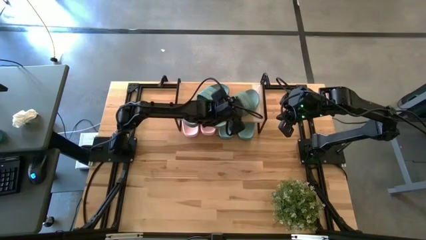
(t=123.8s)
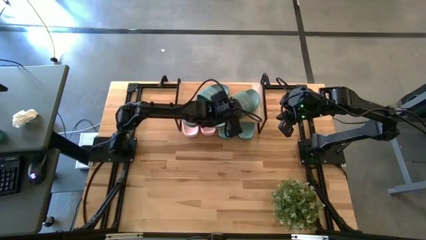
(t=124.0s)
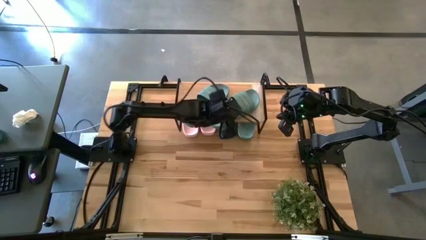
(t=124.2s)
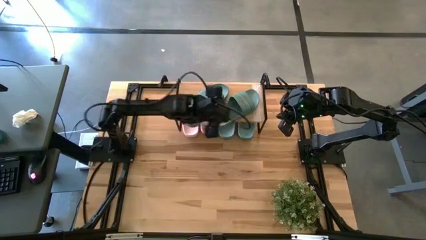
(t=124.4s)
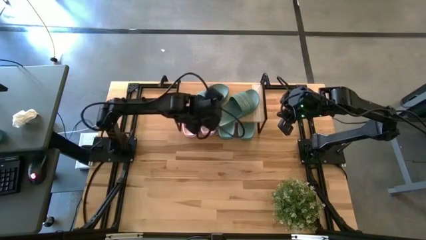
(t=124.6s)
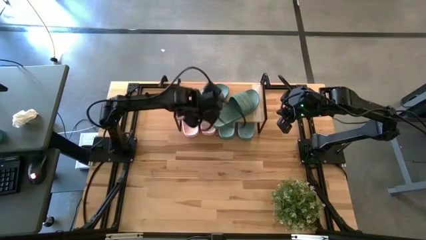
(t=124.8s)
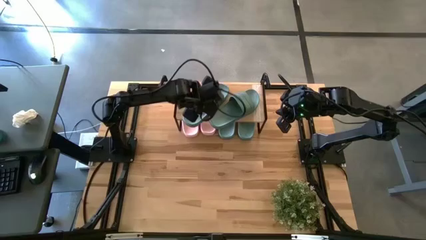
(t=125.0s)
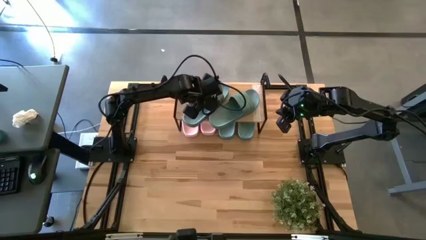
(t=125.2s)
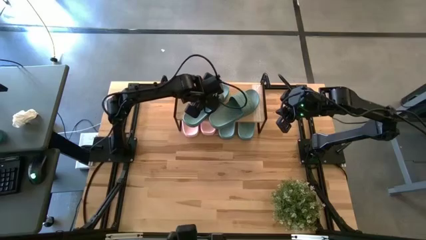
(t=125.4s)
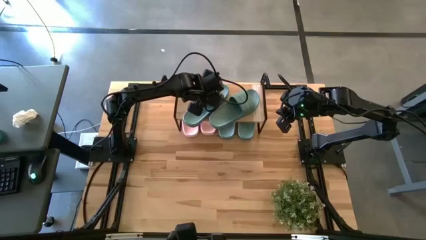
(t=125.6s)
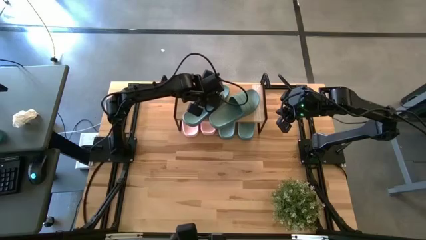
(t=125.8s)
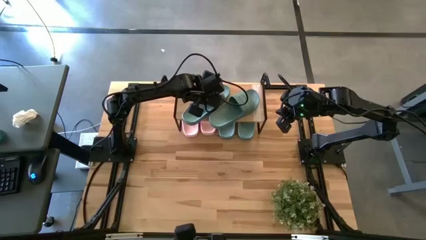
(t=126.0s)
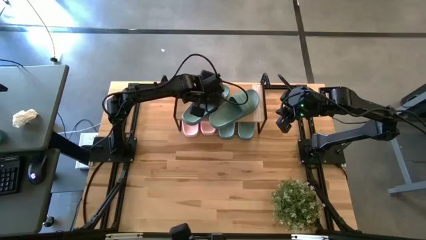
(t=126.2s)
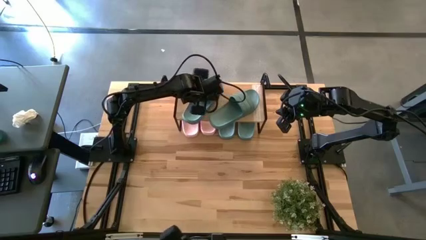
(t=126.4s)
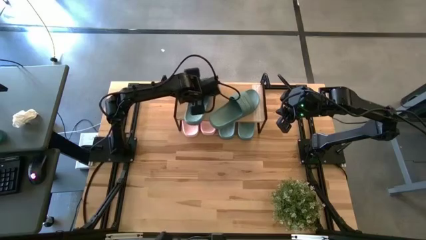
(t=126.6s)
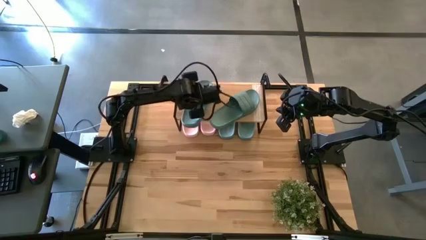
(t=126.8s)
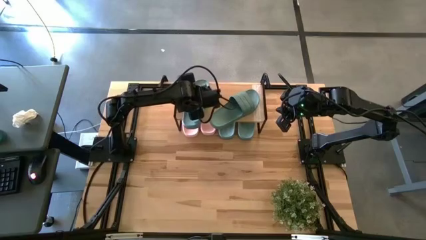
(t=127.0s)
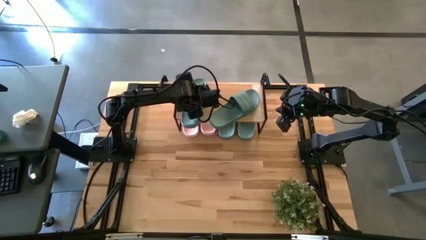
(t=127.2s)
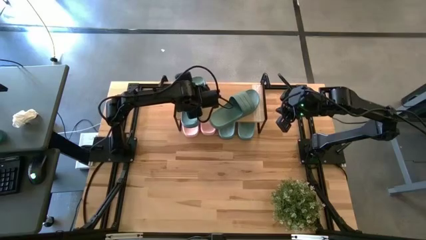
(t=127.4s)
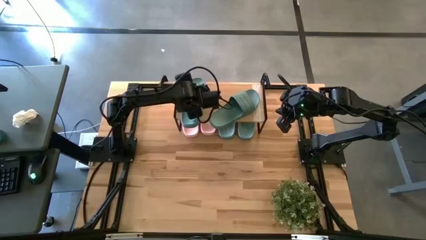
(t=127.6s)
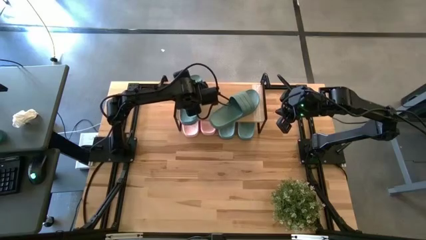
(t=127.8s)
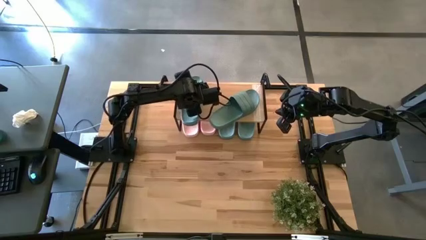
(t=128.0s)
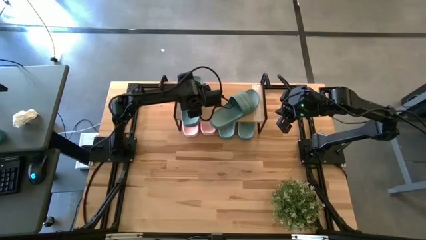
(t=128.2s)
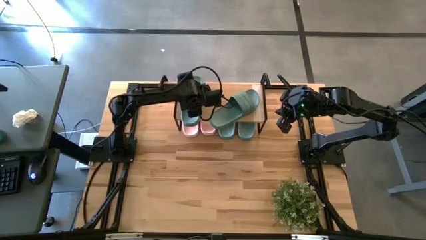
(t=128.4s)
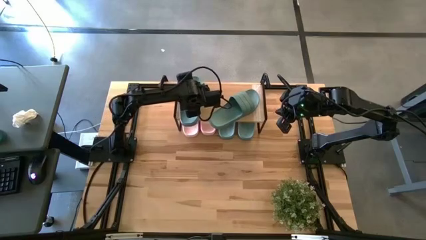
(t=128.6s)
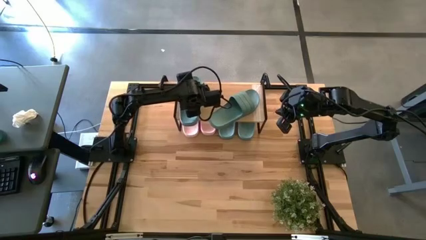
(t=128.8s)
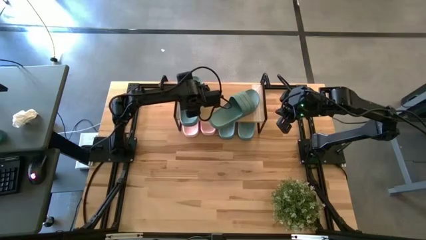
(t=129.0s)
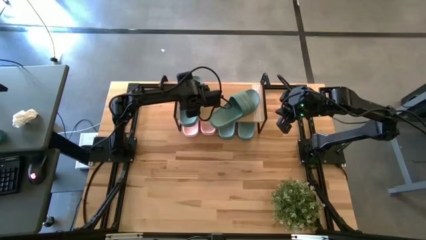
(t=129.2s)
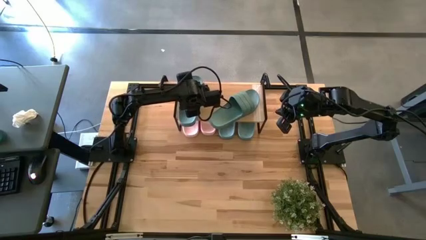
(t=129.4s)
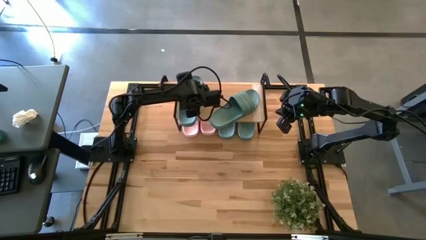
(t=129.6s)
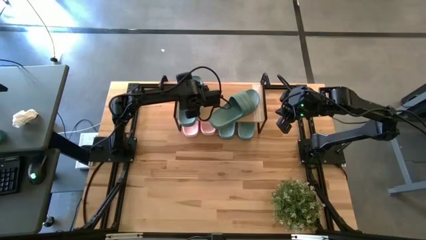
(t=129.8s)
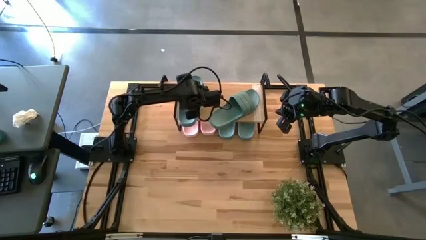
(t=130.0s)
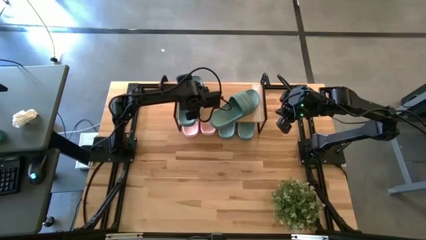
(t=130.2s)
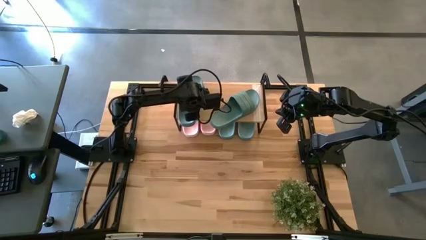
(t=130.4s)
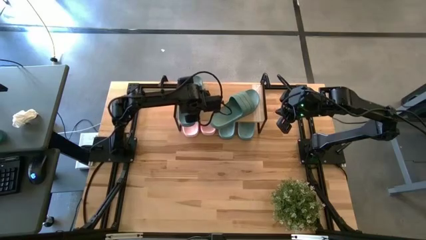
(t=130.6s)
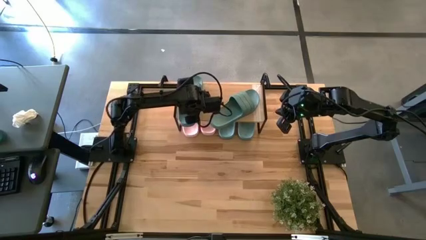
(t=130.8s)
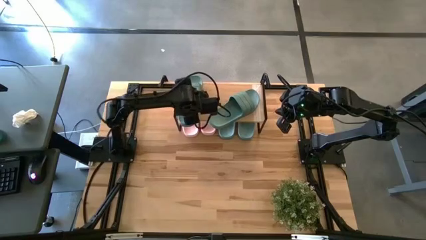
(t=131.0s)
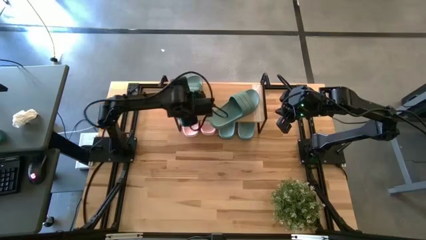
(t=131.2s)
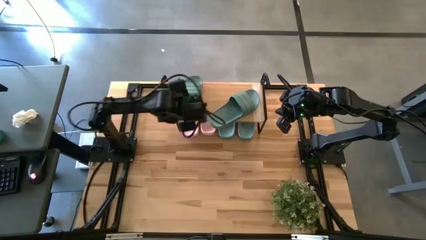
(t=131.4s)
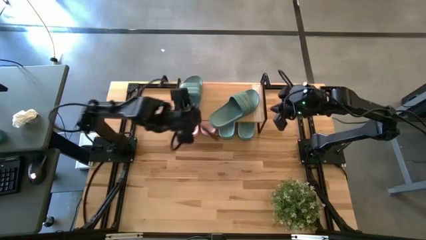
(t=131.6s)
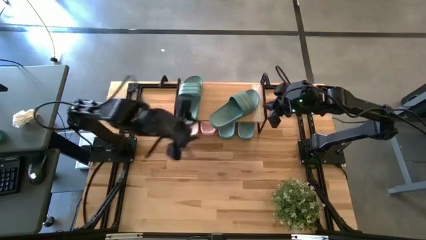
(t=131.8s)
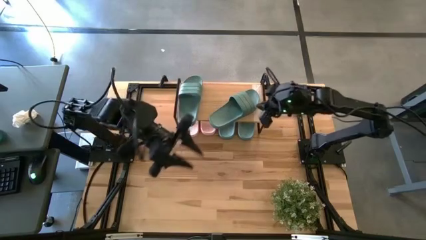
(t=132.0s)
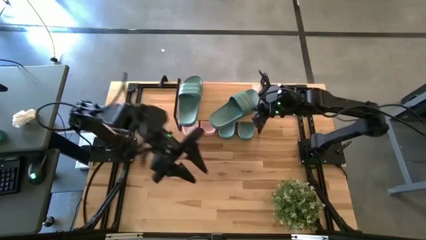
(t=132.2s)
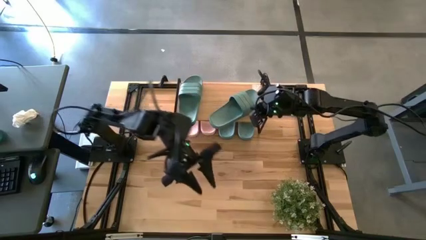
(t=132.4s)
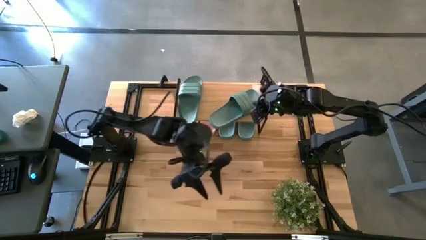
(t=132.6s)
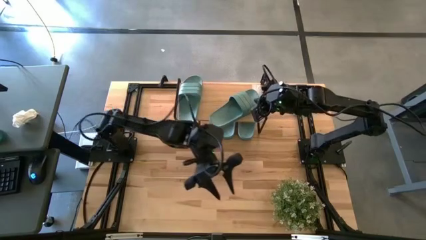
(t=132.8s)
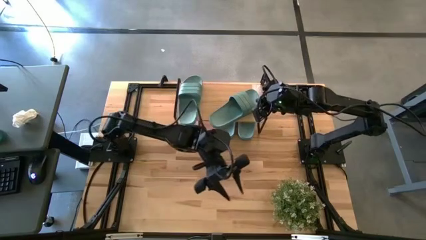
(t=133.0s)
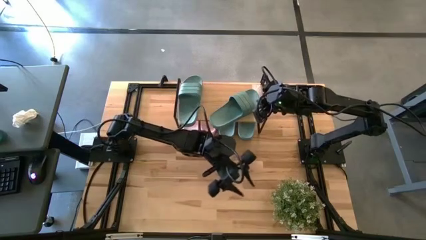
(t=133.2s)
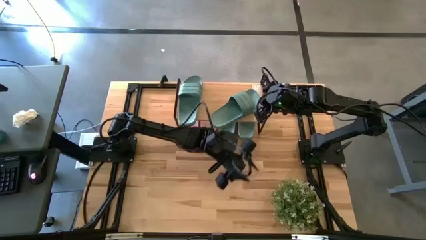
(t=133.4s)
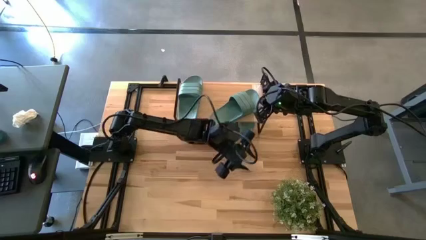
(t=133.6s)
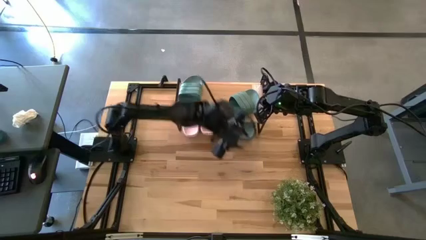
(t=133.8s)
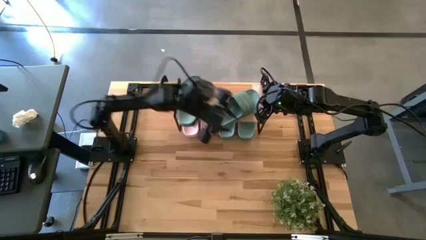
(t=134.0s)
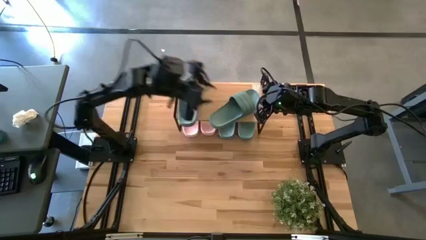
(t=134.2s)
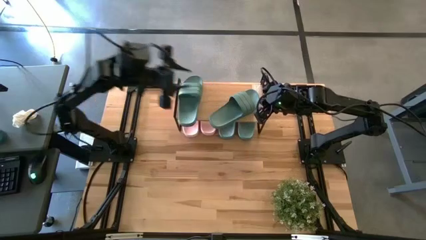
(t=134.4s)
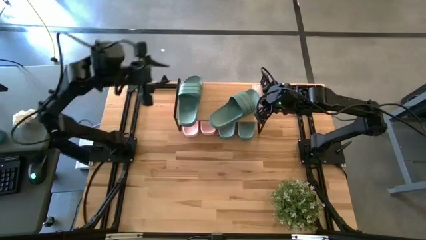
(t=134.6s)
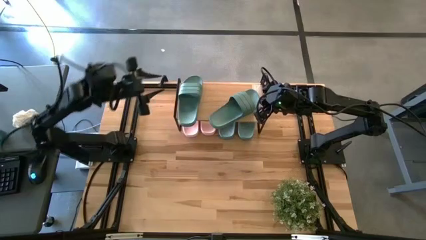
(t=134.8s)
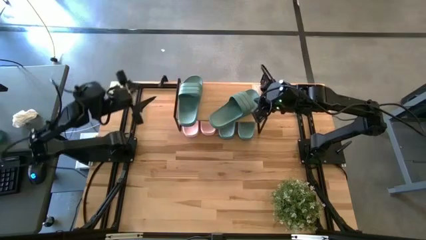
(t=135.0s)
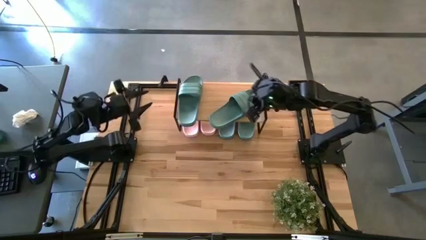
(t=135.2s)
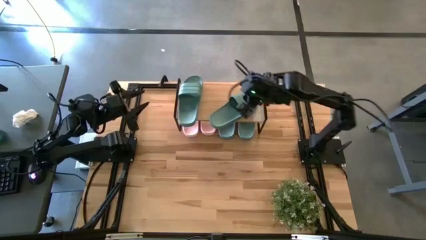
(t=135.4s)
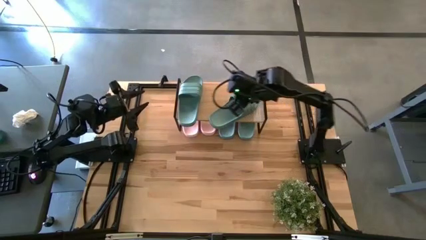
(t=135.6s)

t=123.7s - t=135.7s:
Task: Pick and place slides into the shelf
Adjust the green slides on and under the shelf

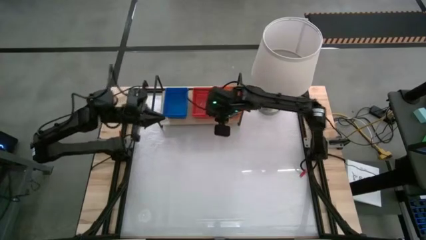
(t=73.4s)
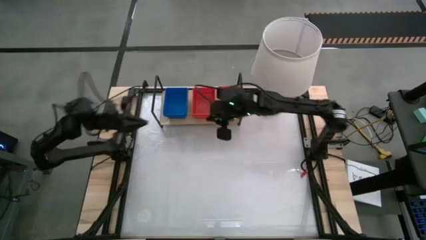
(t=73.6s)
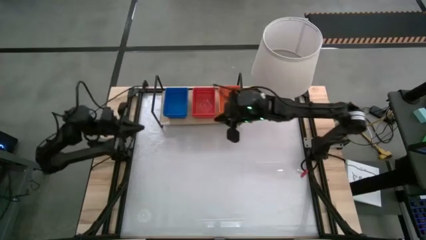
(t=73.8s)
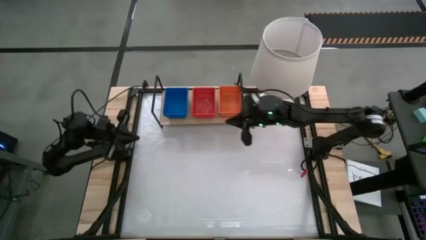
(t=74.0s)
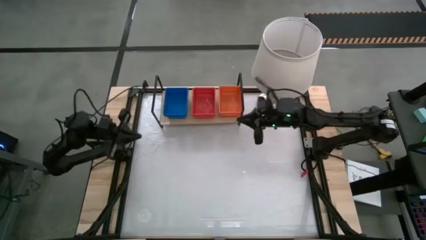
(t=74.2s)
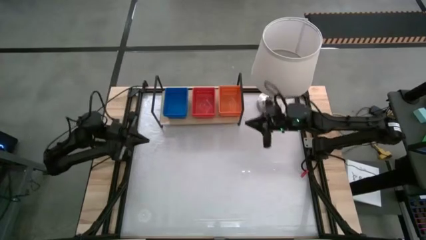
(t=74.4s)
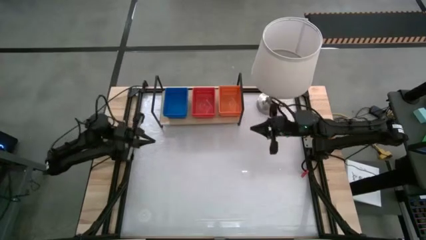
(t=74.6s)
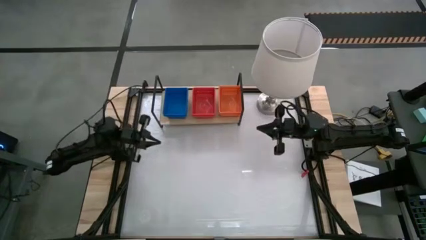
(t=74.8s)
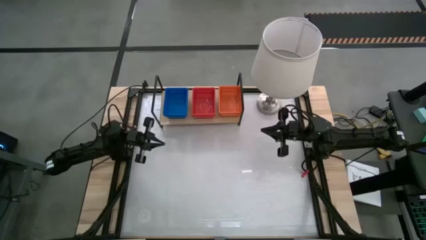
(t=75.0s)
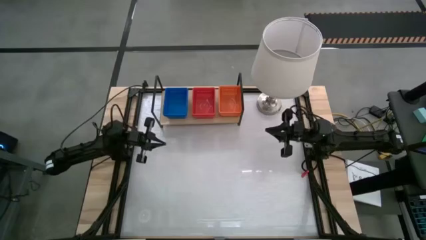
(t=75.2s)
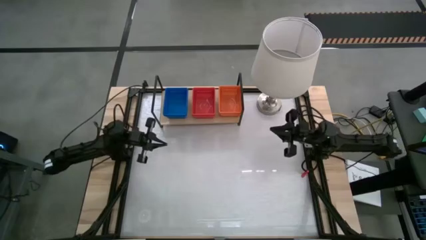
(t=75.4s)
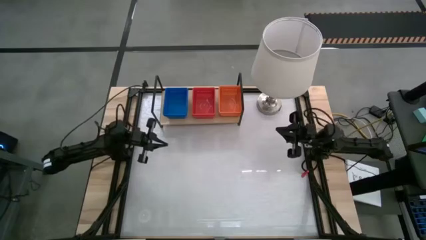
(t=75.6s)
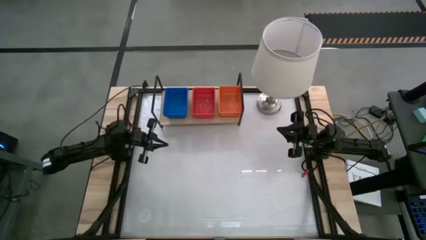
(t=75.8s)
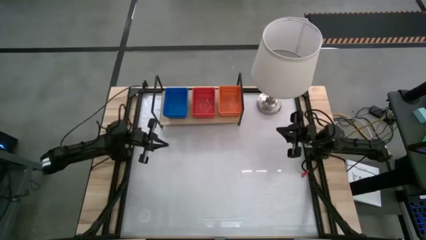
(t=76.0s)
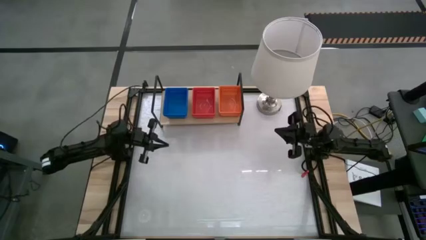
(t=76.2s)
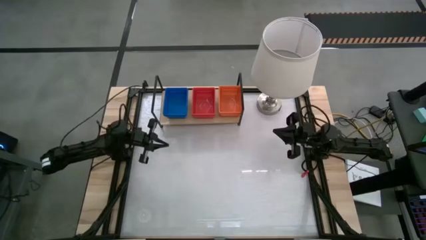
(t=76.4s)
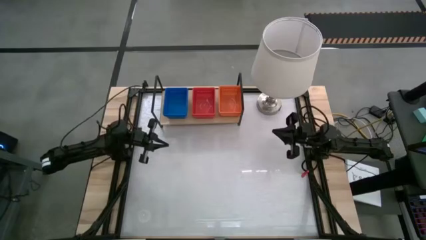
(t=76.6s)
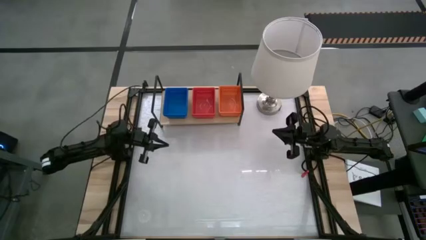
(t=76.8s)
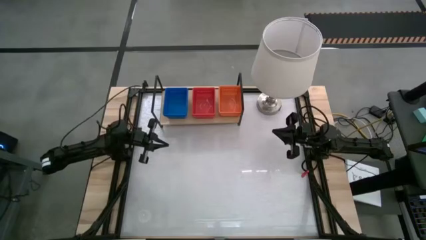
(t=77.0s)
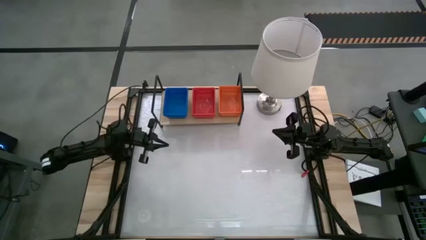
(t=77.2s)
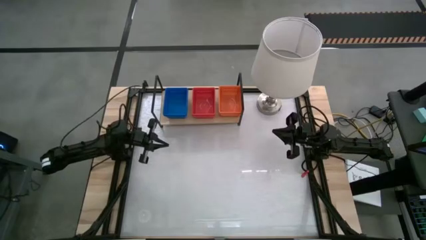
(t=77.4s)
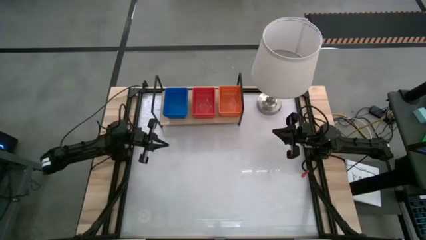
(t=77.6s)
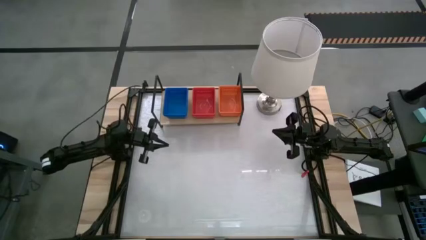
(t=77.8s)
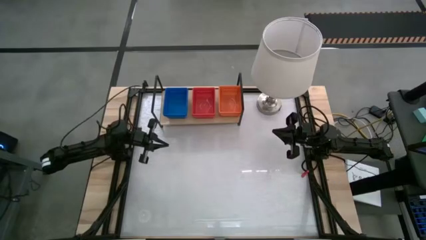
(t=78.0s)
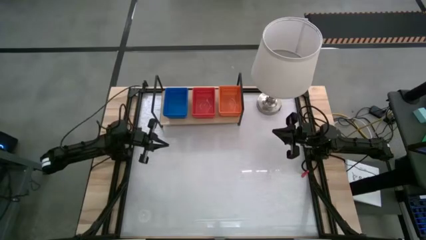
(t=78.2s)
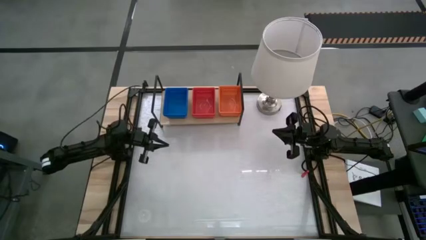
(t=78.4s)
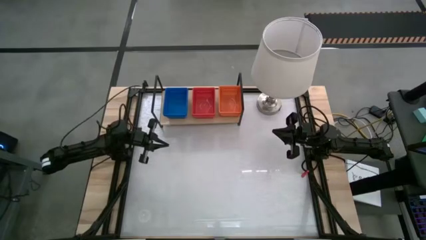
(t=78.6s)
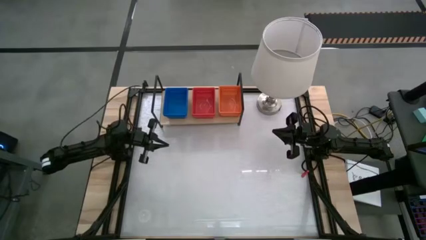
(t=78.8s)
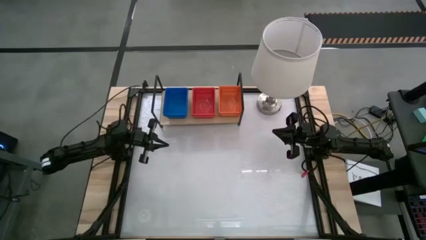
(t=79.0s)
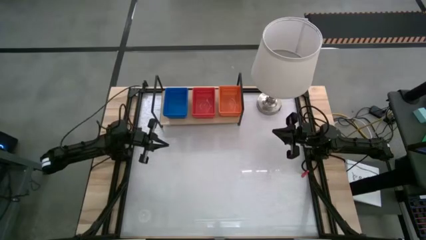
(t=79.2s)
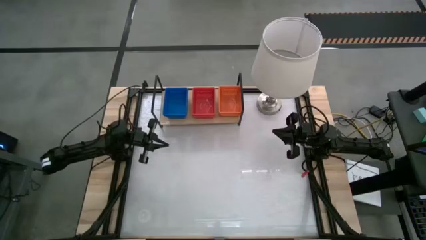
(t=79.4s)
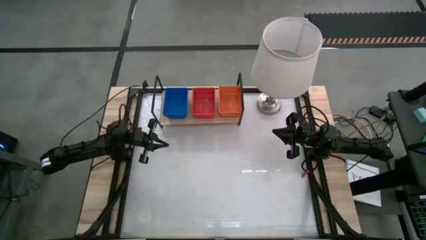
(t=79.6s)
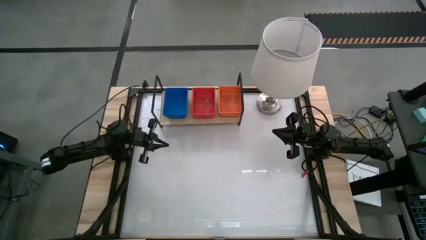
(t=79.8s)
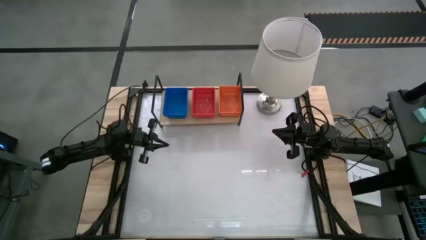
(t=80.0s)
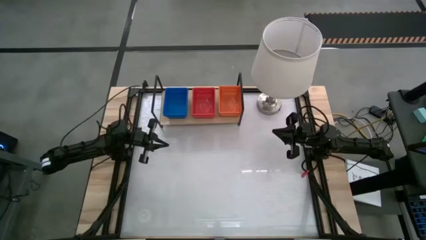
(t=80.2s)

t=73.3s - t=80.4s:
Task: Stack baskets on shelf by color
Return to Home Position
